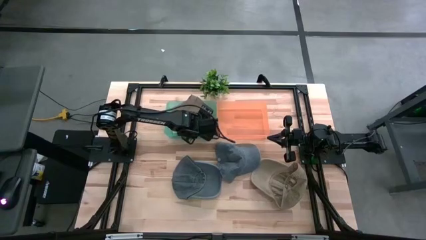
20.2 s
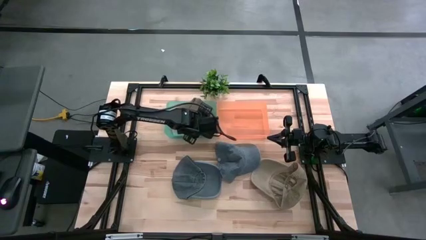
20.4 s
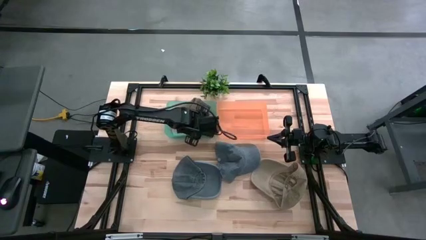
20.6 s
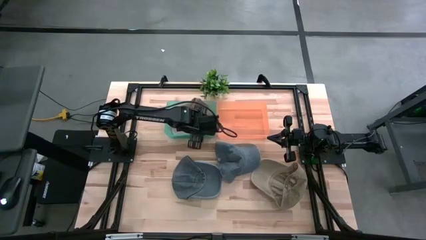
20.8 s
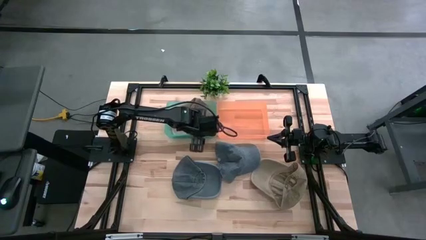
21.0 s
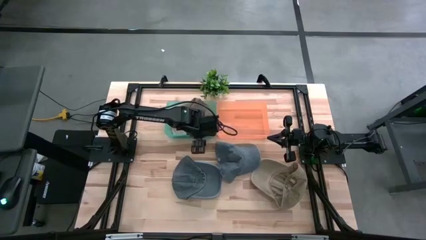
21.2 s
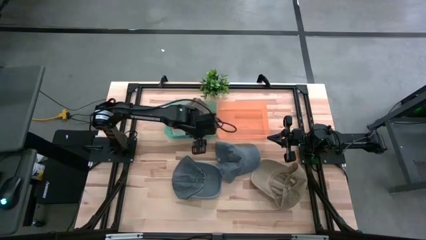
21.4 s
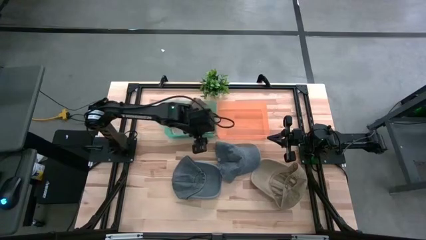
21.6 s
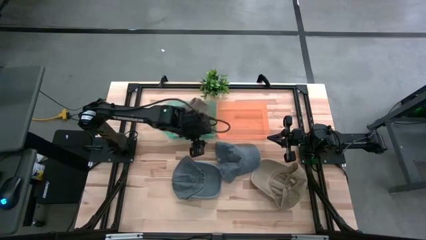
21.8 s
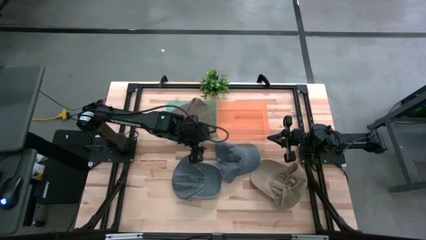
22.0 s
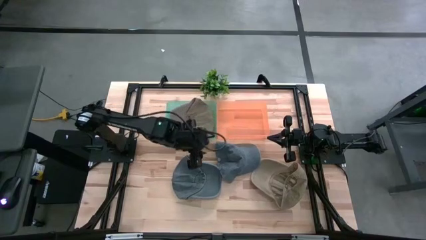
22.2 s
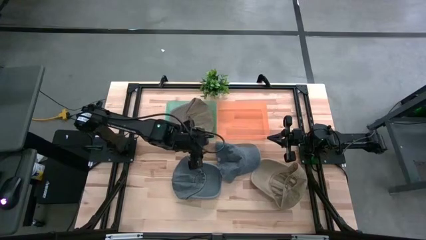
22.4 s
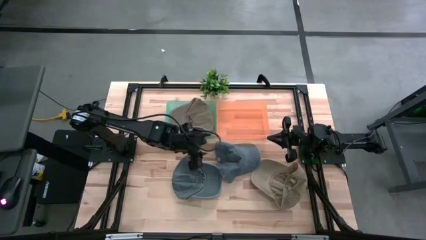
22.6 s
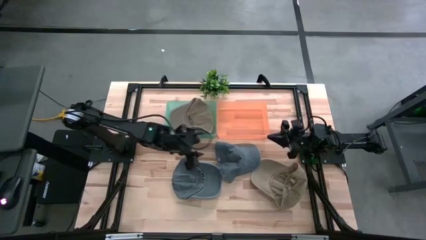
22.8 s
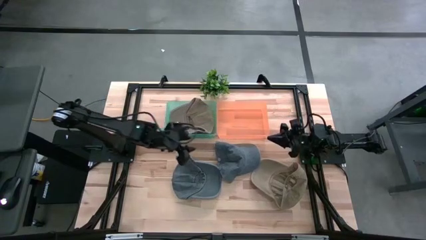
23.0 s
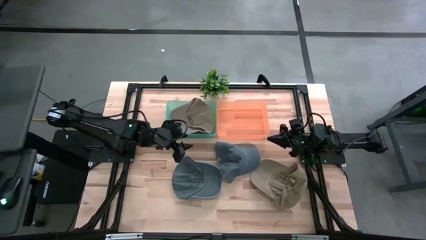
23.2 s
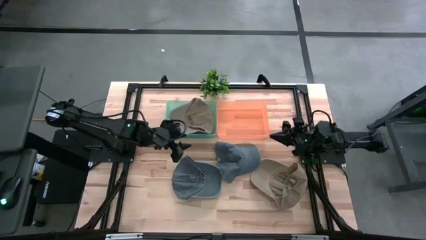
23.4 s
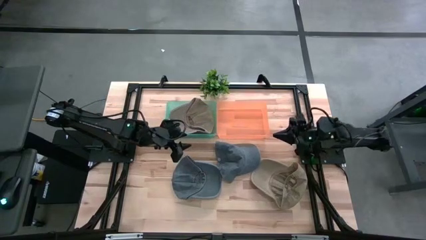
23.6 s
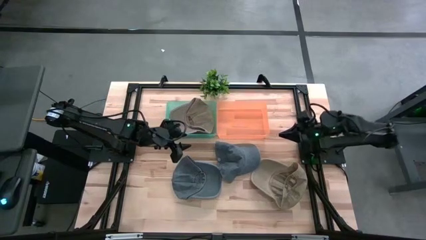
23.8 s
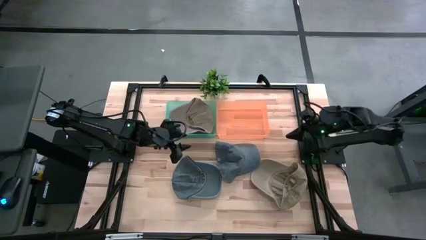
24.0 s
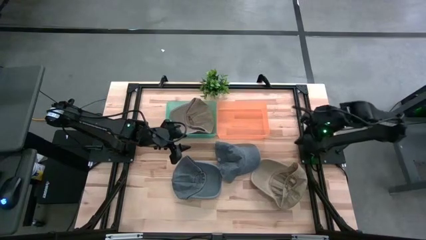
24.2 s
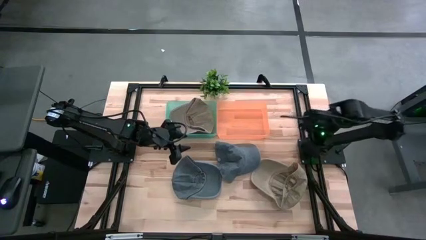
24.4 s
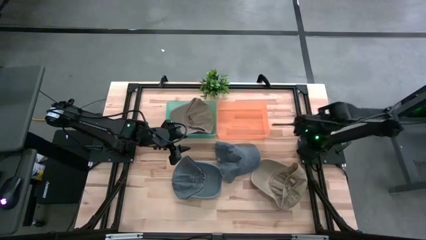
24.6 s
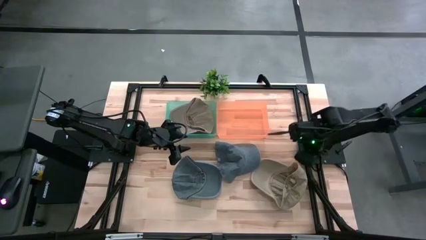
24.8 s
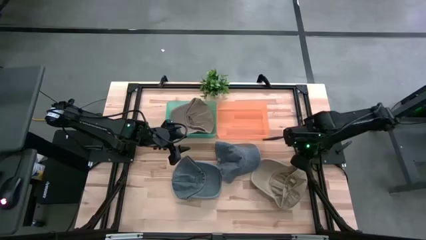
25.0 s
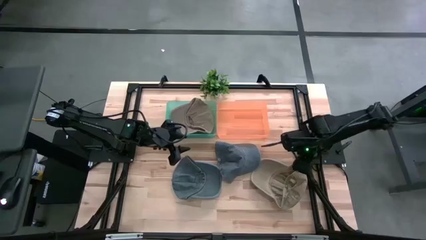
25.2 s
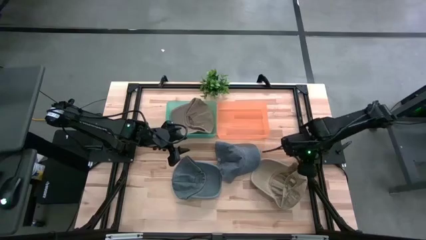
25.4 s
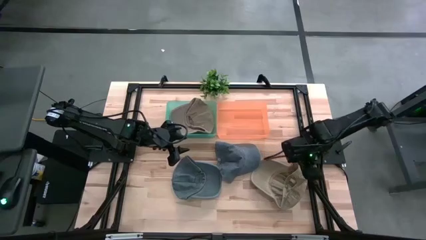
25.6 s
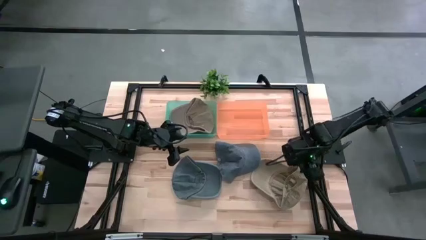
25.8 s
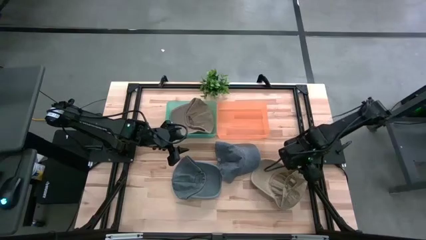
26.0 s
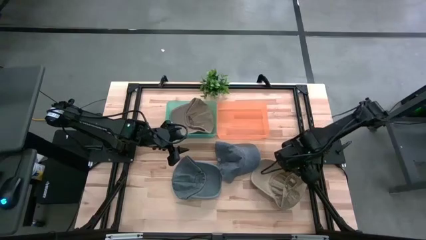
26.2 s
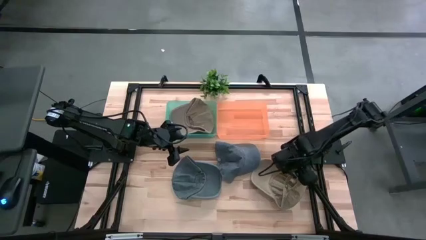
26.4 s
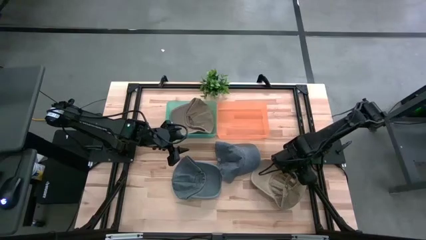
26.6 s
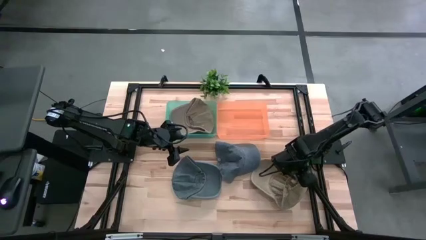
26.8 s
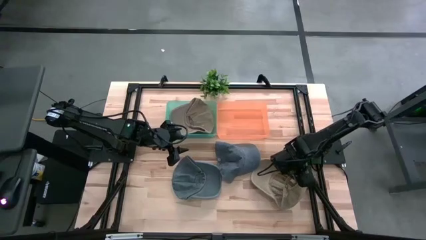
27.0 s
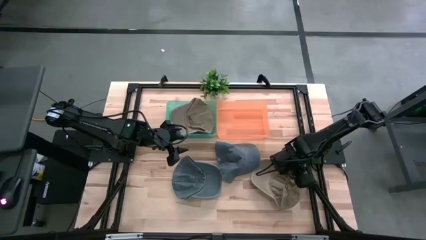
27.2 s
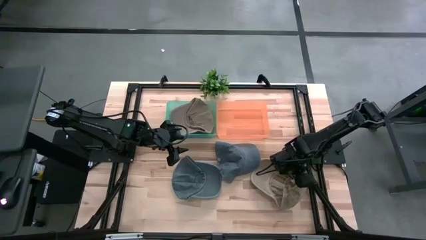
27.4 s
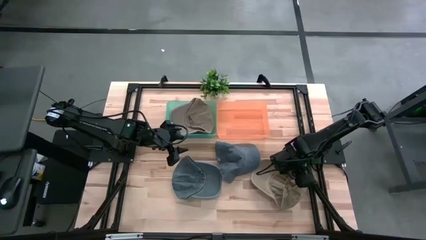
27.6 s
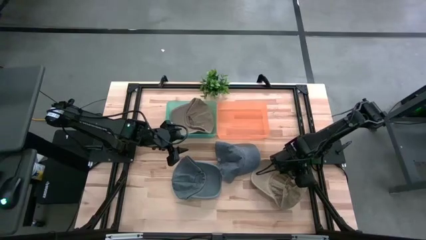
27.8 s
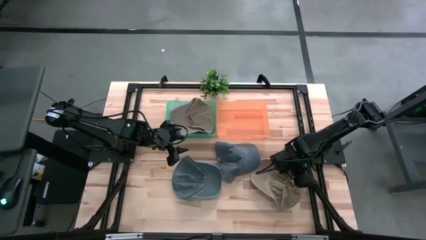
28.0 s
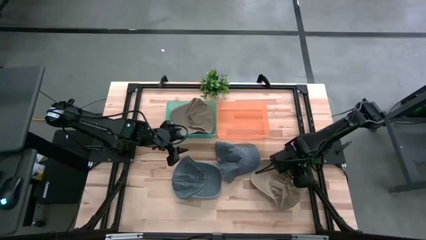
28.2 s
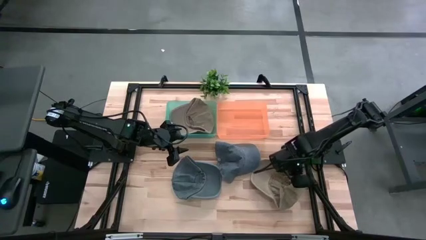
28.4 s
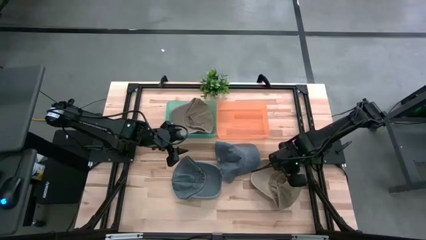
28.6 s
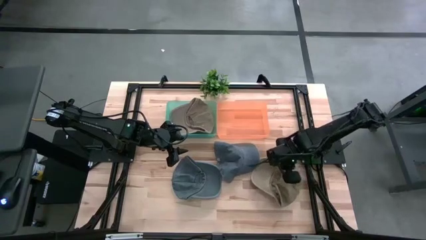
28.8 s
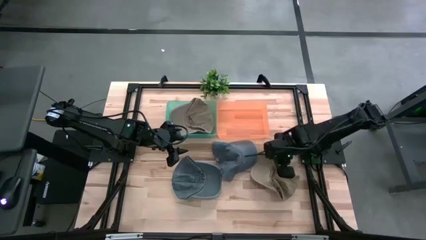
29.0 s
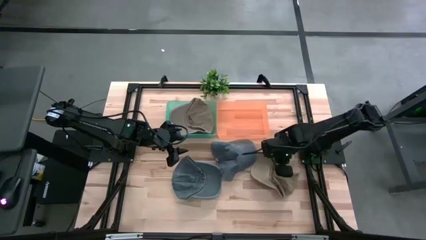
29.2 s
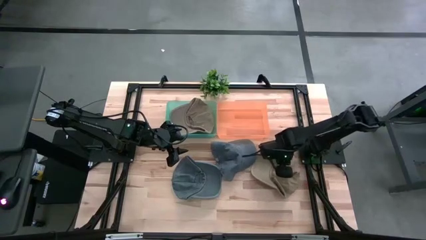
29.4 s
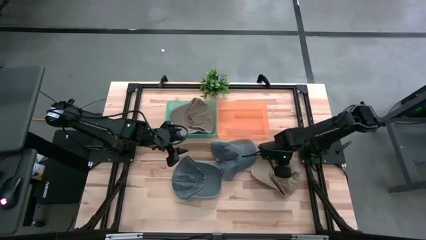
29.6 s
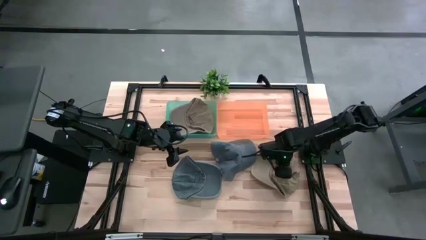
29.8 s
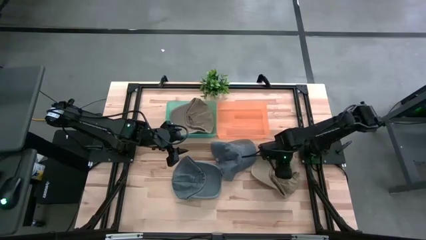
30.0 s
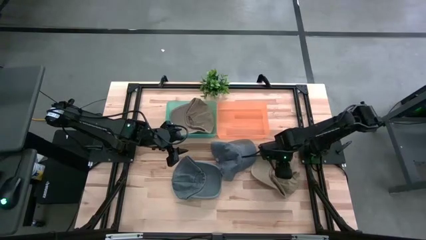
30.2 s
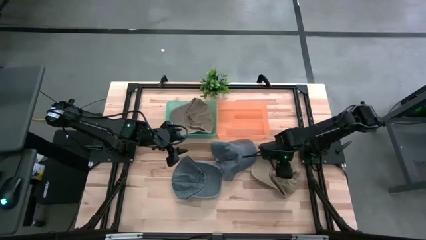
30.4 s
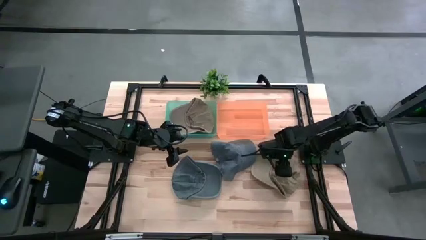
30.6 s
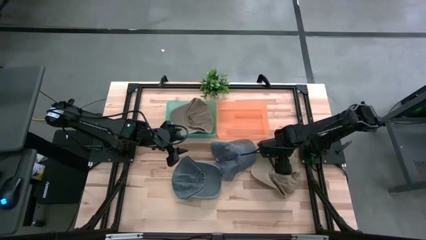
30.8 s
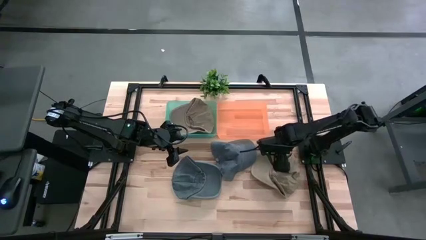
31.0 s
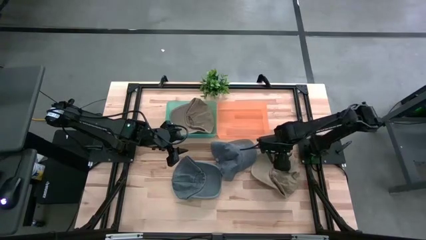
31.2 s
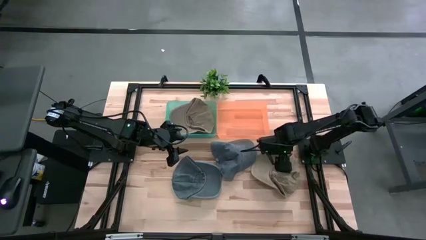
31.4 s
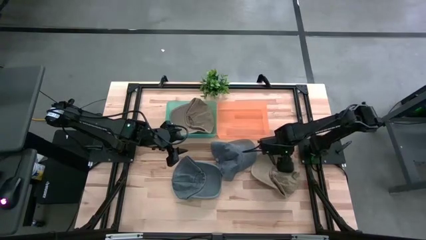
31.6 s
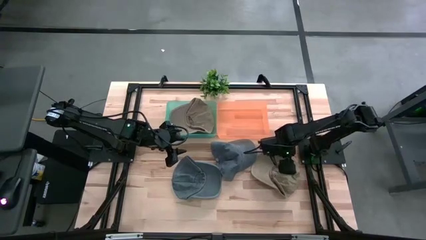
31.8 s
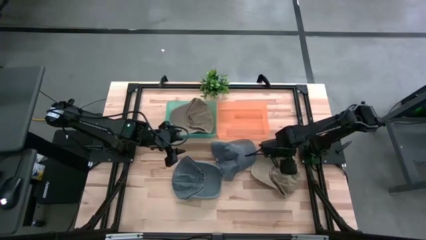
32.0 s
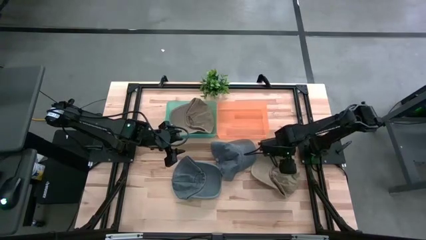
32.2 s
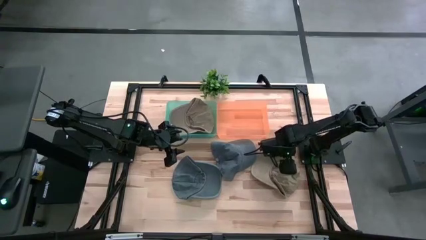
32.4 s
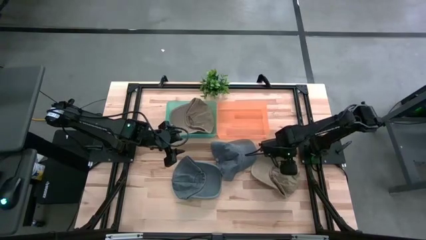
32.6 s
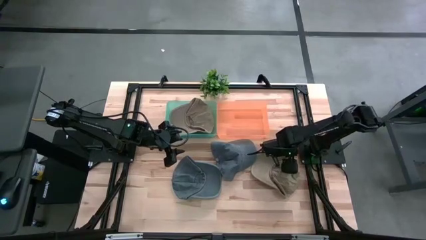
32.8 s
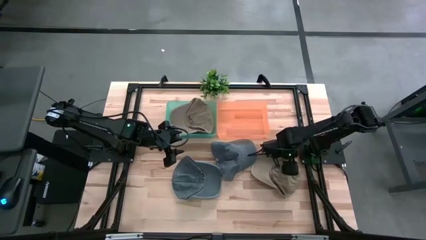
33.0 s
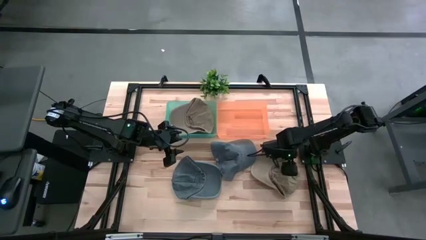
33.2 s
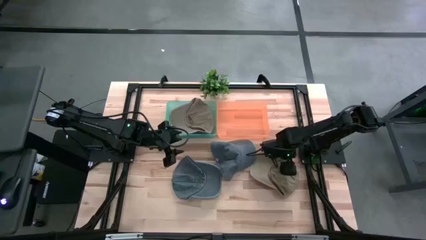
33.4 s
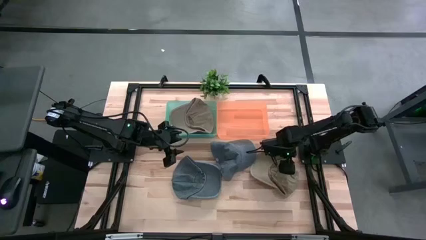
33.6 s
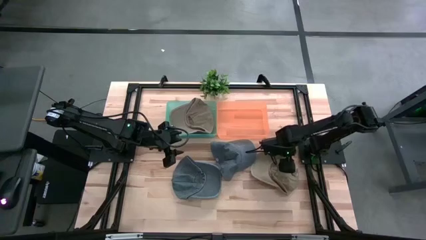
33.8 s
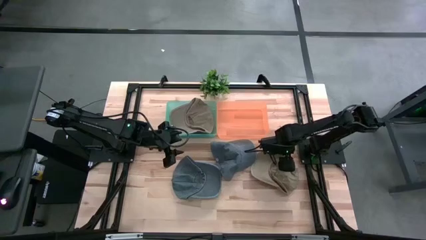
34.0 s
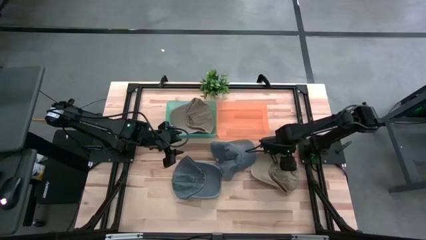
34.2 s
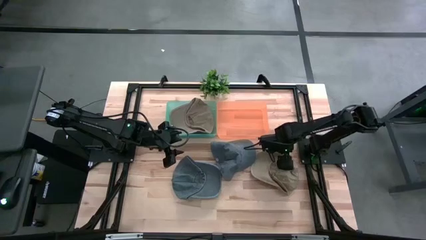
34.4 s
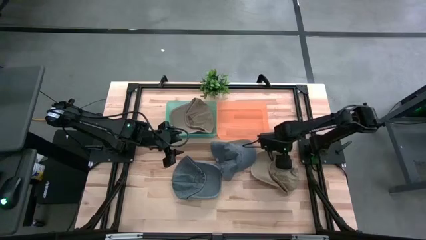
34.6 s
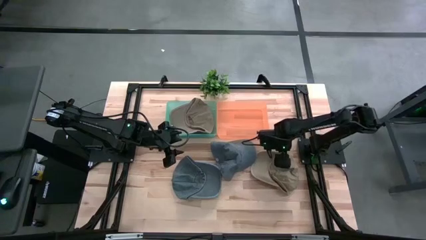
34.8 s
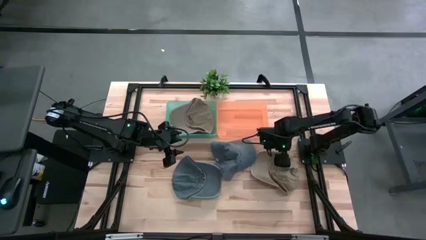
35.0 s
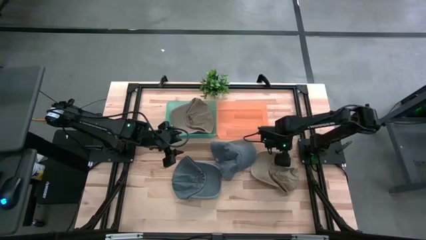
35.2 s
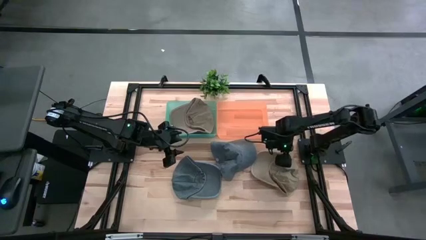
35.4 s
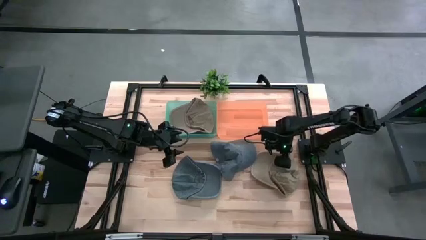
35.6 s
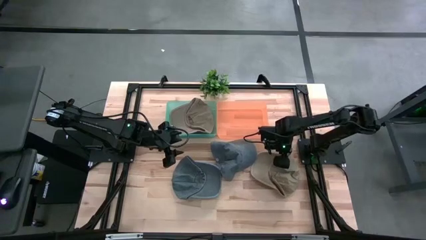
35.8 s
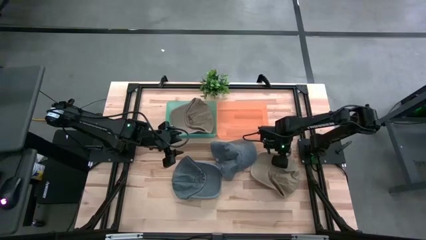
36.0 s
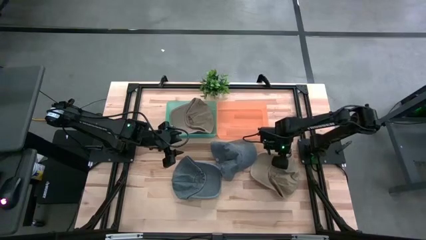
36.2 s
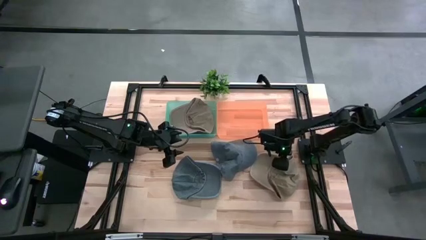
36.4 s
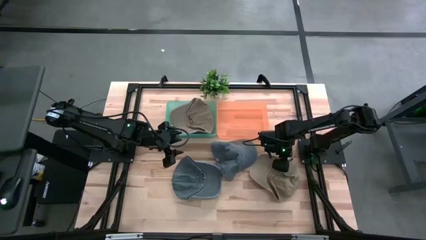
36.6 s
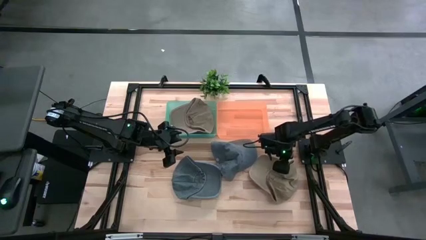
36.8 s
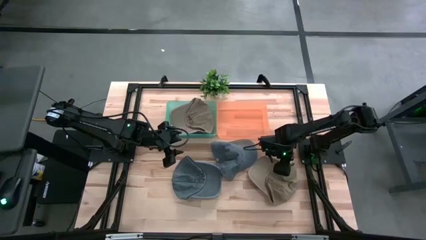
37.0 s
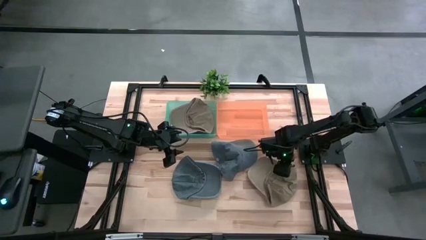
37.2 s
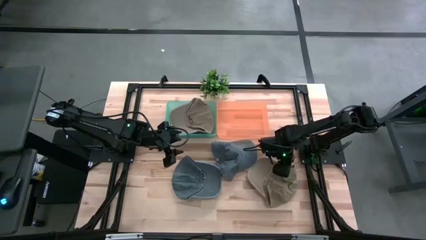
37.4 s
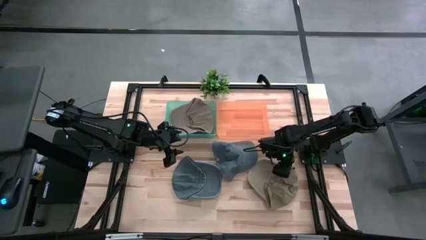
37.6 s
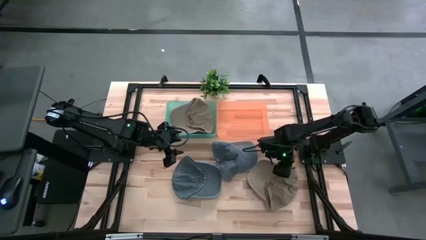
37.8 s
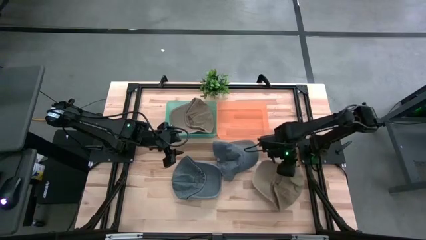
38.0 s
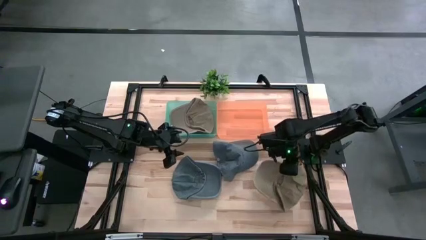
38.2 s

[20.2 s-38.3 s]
Task: Pick & Place hat
Put the brown cap into the light green bin
